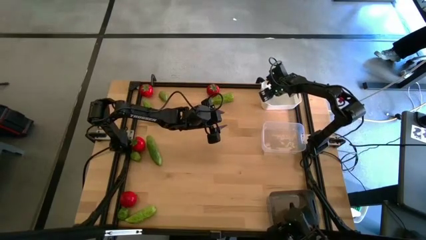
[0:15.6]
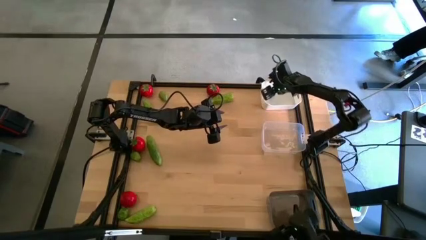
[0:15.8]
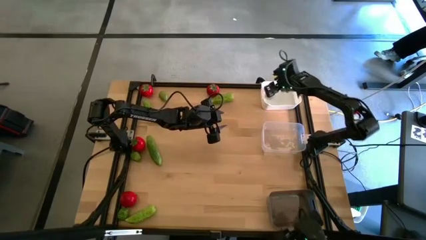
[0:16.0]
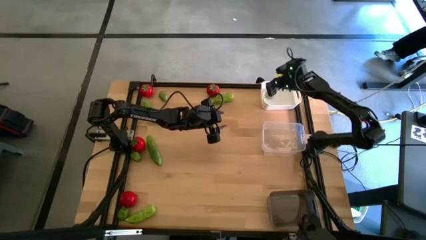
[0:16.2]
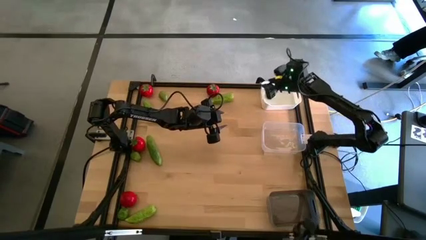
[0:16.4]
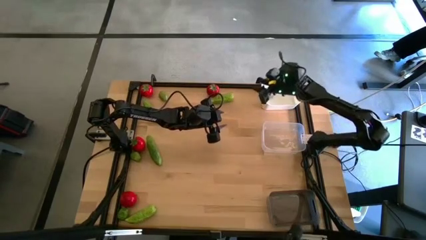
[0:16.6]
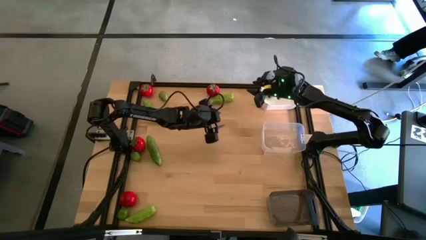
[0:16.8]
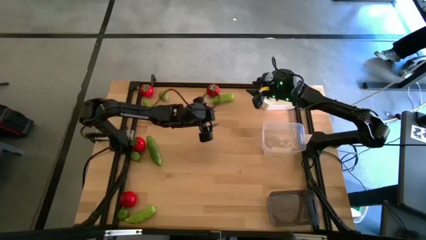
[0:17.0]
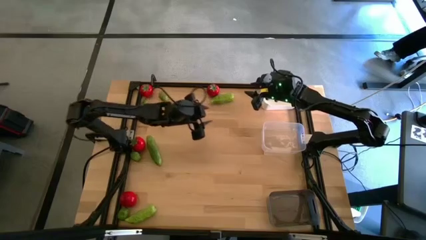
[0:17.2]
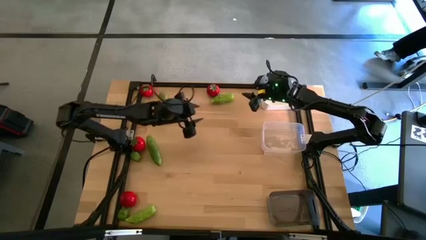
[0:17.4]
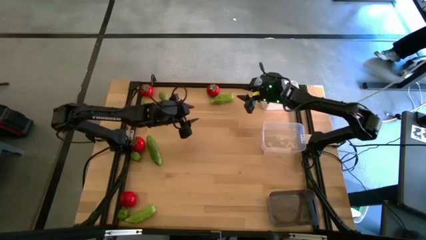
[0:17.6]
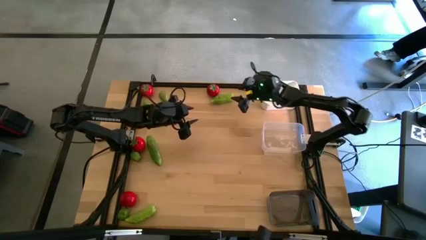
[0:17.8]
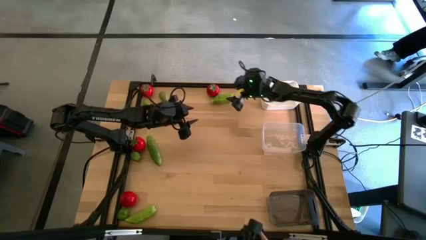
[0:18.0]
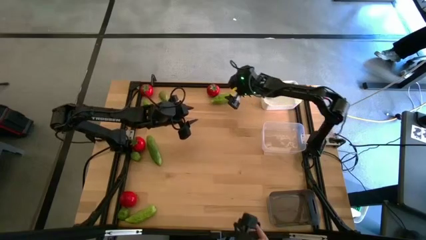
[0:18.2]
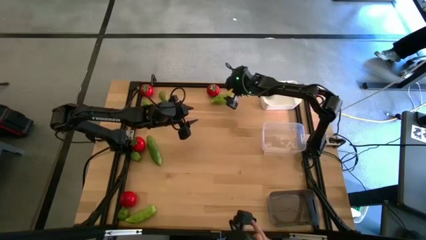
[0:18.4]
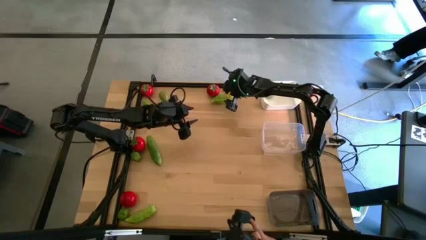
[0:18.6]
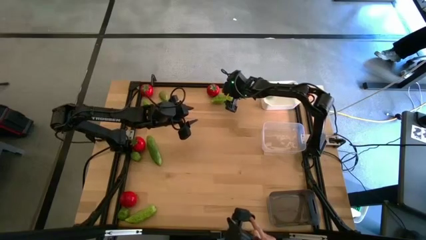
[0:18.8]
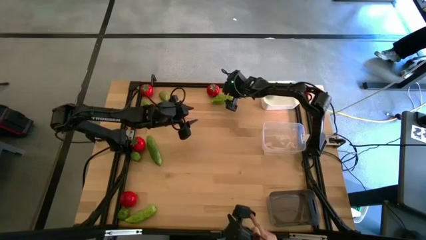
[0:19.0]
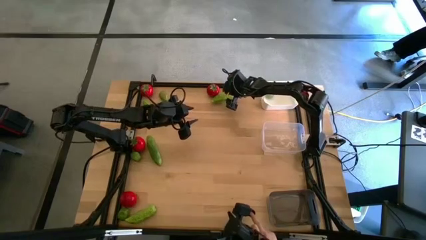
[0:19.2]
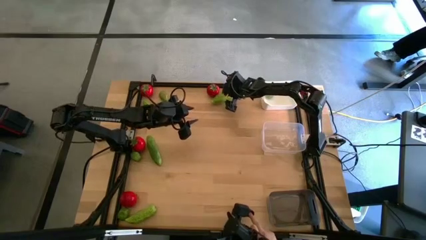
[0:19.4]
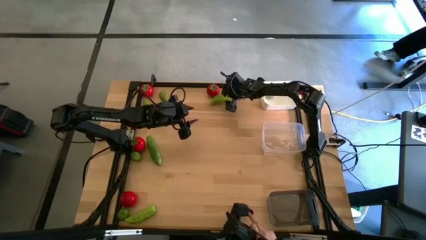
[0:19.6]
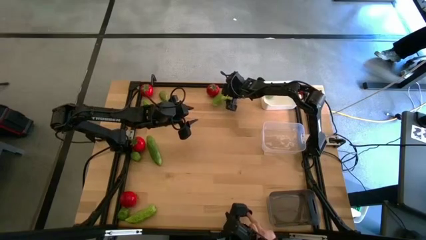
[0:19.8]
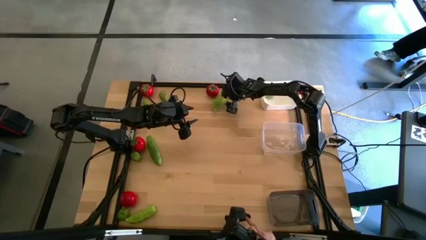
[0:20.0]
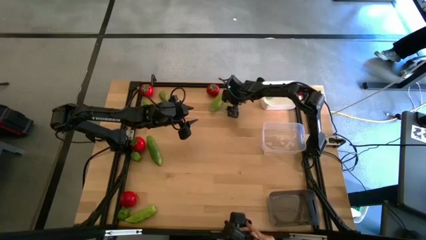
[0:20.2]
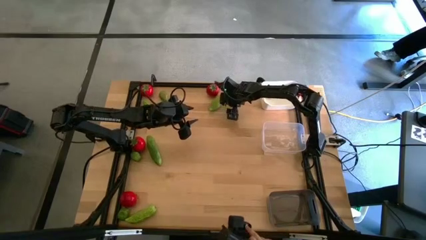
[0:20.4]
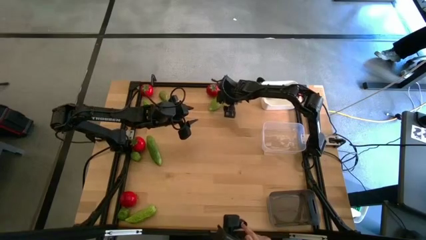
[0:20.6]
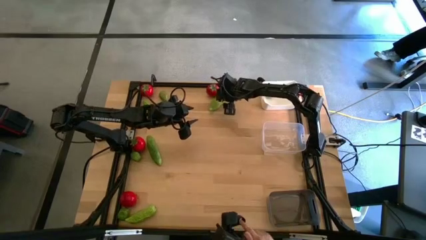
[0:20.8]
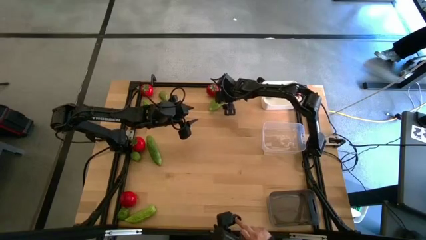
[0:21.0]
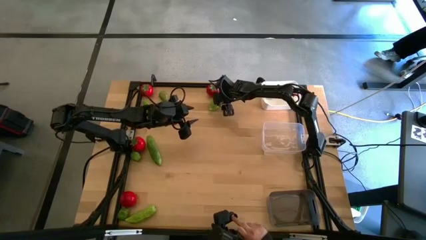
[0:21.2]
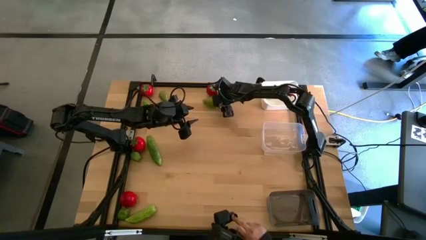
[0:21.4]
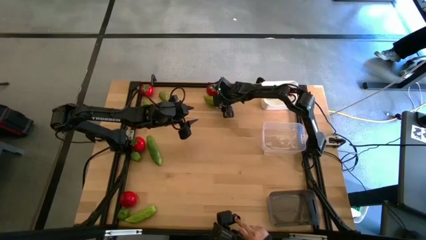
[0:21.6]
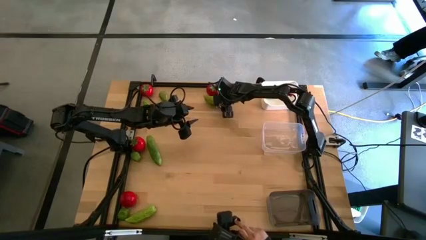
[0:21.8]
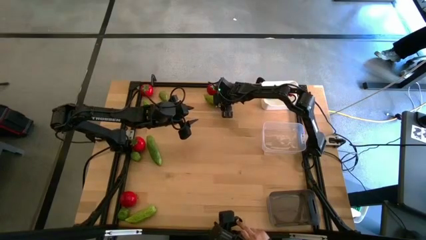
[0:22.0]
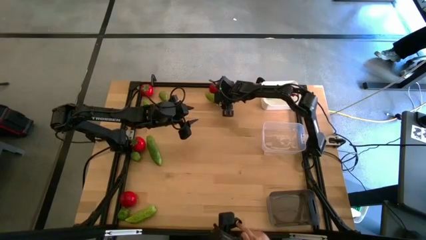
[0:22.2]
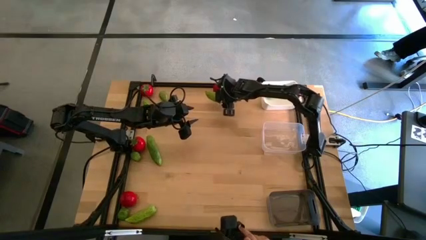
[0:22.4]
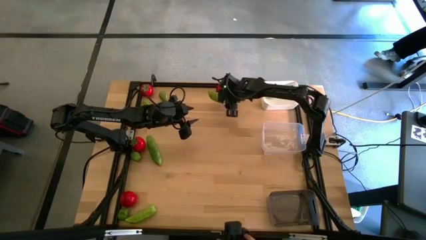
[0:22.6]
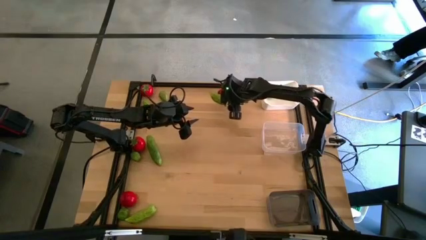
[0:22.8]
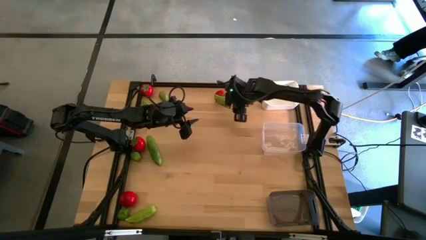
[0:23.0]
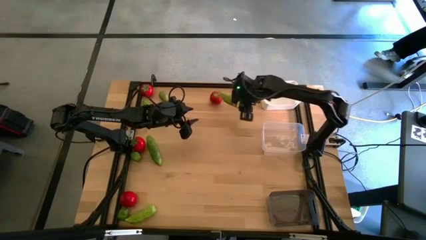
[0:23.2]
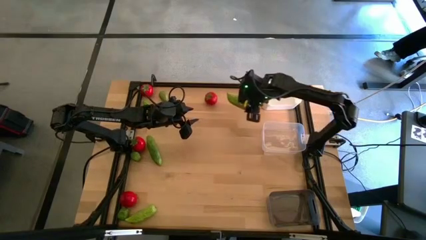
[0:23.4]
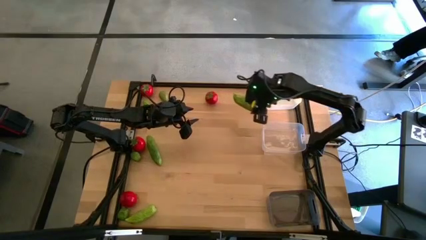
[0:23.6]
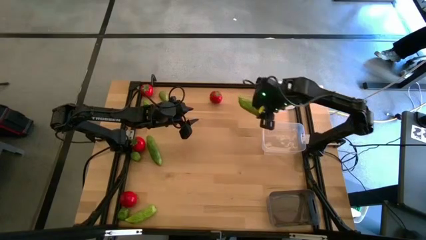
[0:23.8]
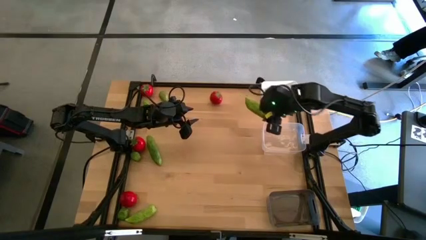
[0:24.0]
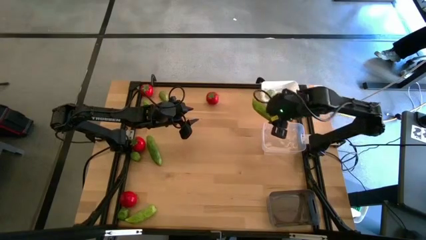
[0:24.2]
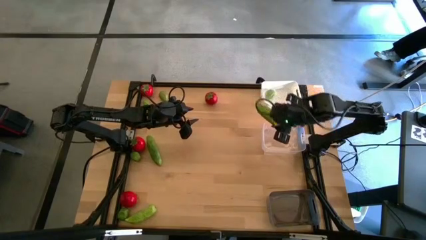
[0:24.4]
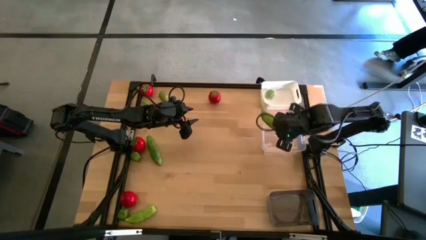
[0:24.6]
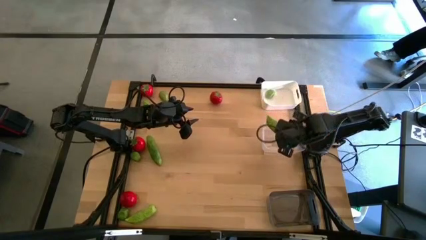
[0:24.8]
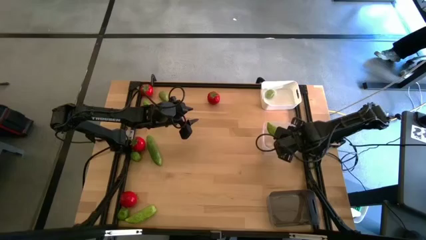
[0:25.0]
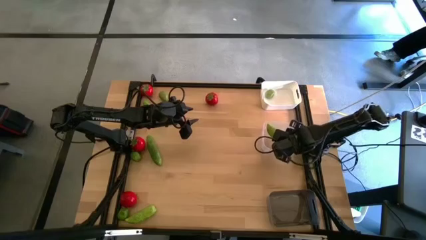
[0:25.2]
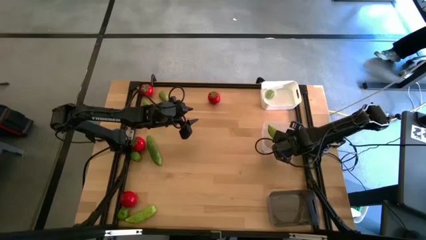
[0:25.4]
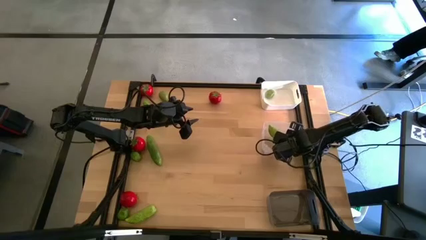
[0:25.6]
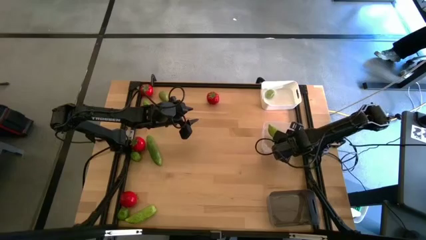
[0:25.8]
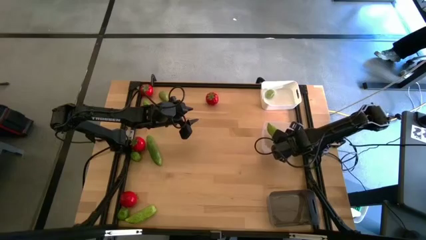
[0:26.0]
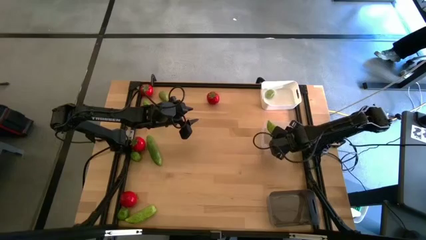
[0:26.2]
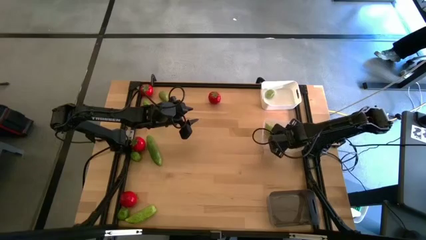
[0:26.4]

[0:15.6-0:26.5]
Task: Sort produce into baskets
Put the top right cucumber into the transparent bin

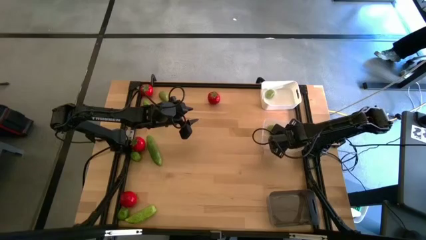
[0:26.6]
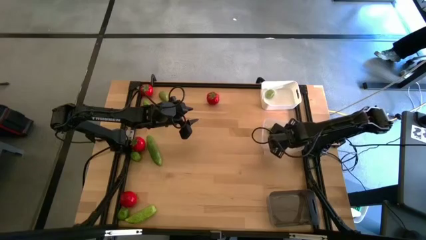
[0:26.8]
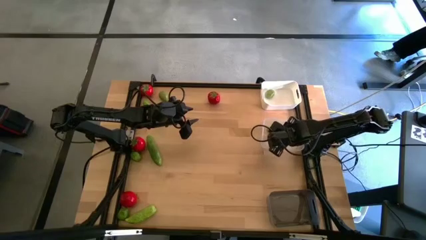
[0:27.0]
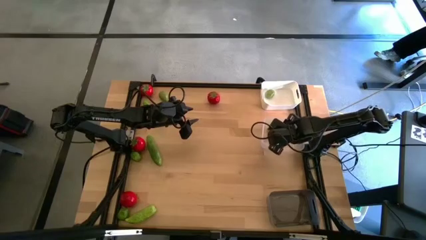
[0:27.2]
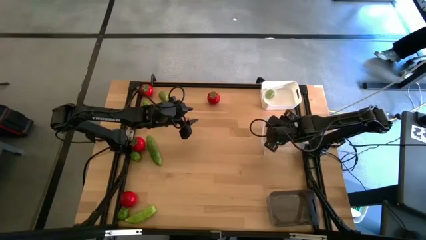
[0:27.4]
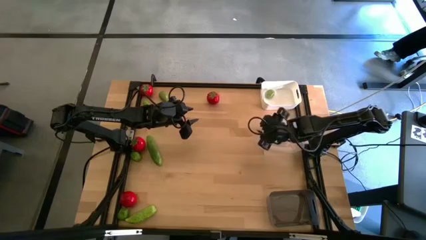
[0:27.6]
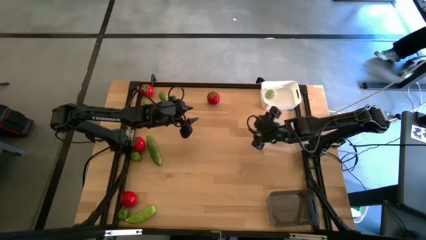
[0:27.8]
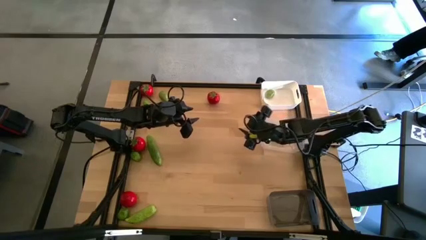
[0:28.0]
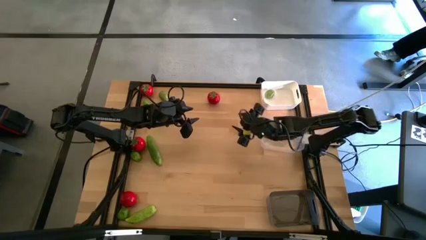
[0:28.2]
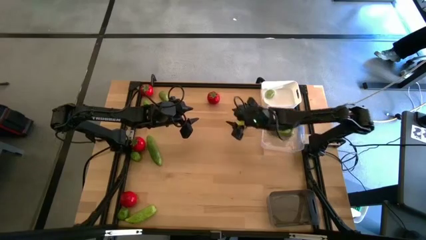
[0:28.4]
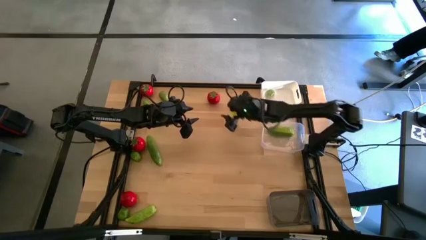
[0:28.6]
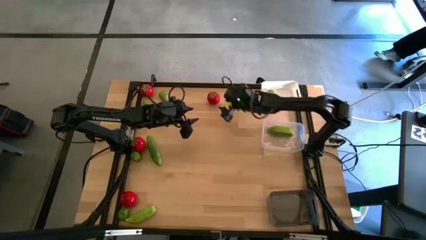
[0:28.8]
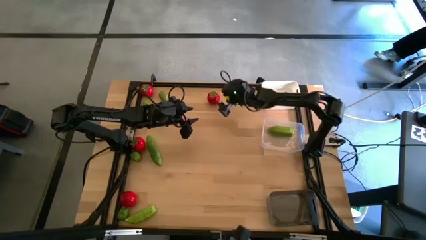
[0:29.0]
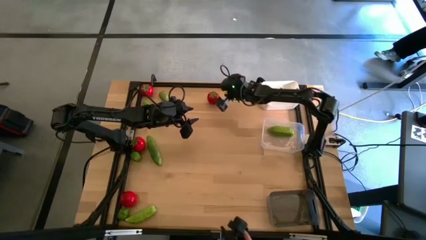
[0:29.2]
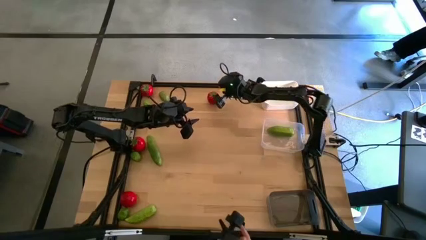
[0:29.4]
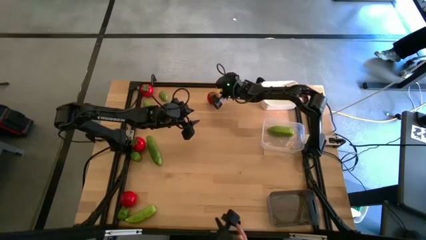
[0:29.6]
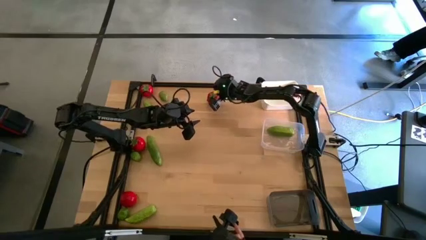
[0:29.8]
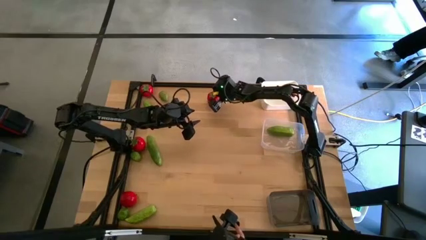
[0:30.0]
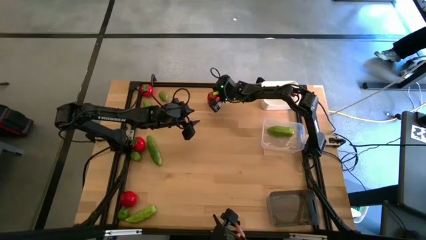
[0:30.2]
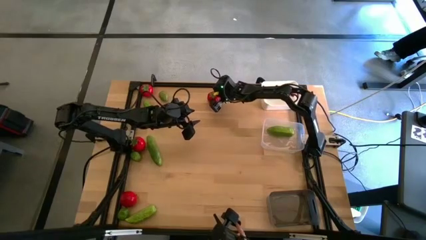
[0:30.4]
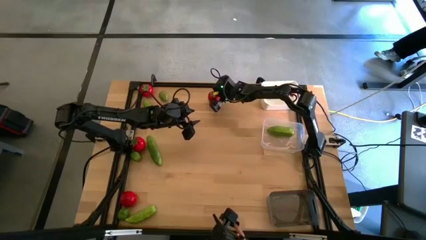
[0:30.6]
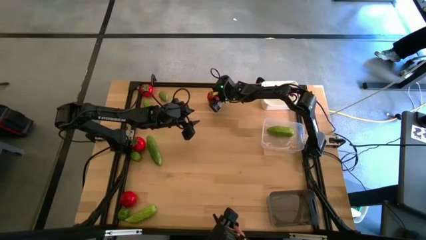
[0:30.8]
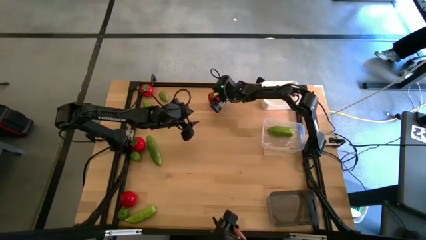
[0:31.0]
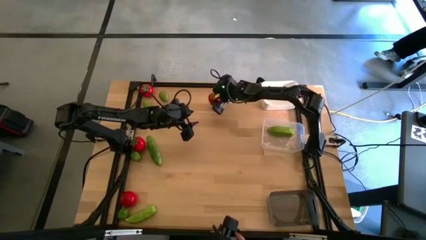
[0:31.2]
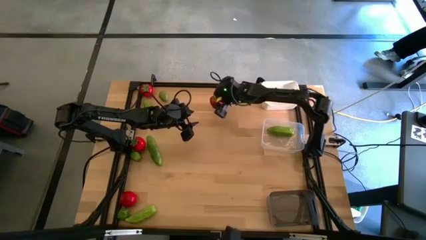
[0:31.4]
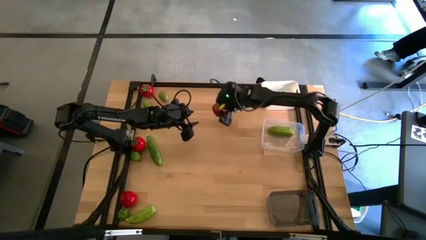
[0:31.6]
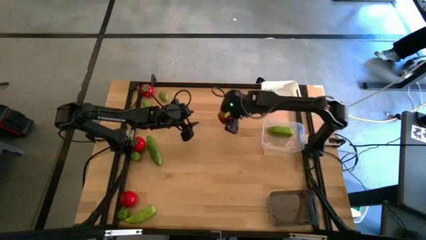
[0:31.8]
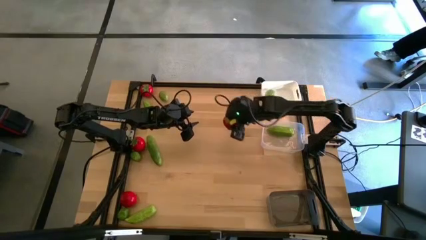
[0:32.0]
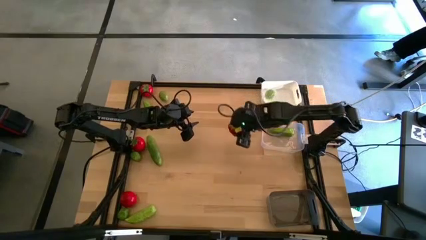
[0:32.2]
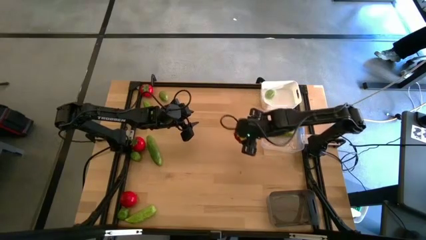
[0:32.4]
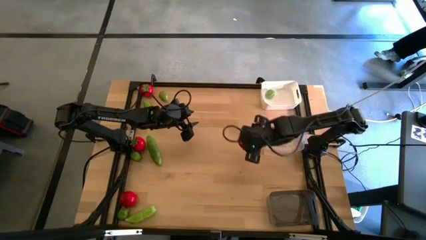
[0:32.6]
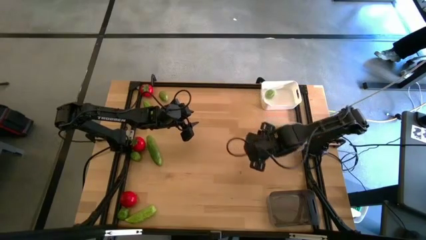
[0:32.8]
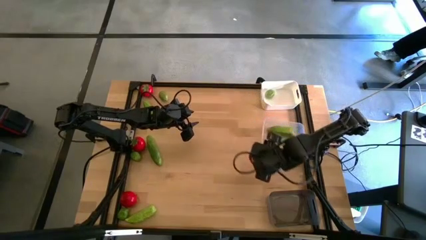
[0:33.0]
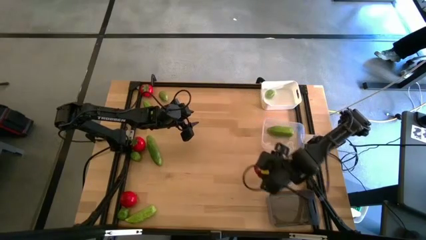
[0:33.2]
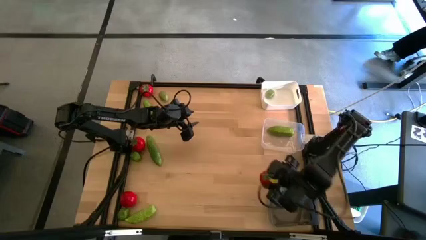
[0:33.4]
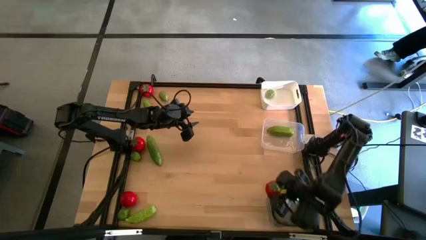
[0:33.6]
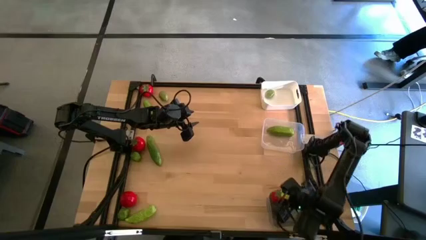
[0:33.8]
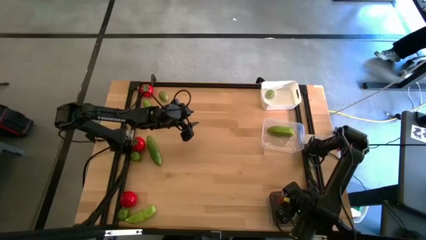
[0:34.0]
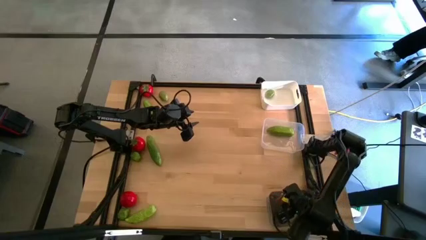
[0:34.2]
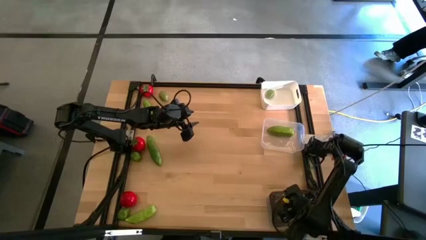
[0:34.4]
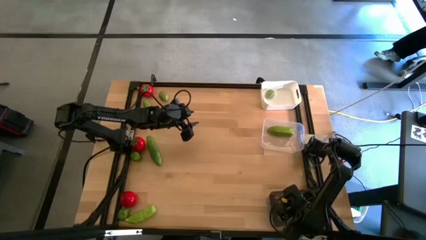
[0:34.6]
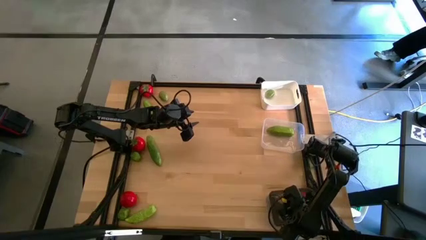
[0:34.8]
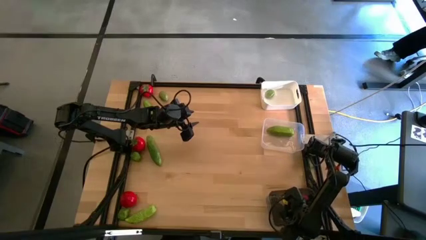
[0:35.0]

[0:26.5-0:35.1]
Put the top right tomato into the black bin
